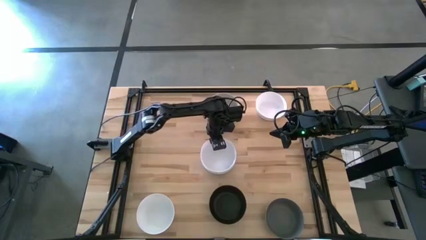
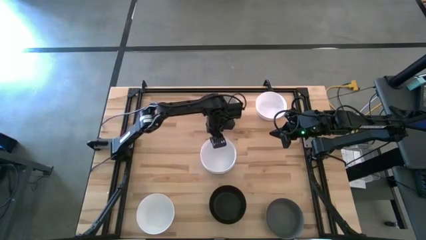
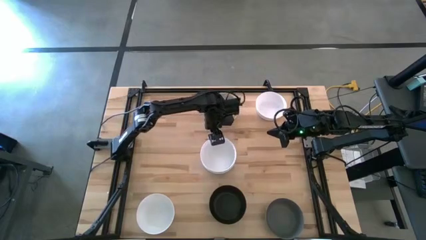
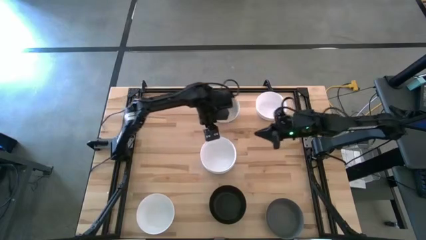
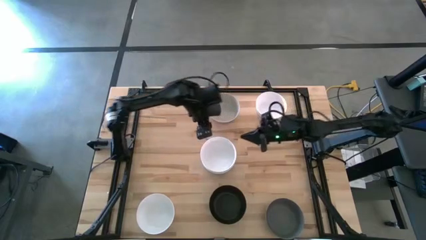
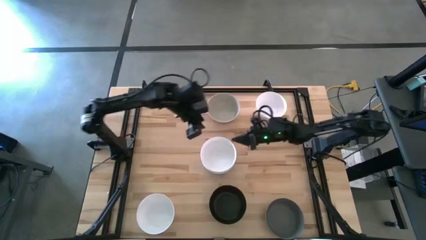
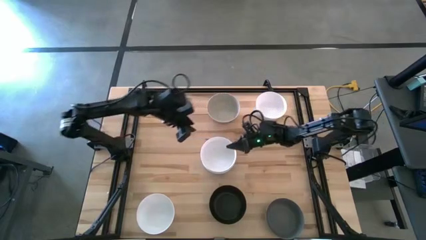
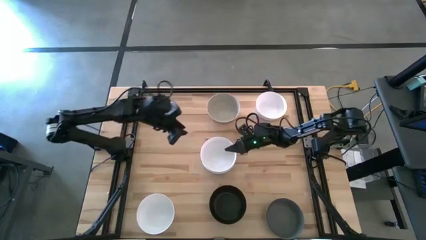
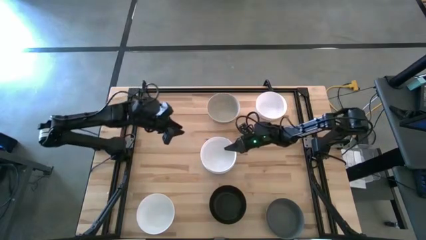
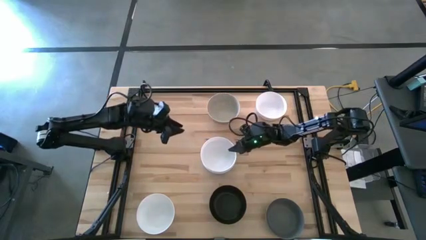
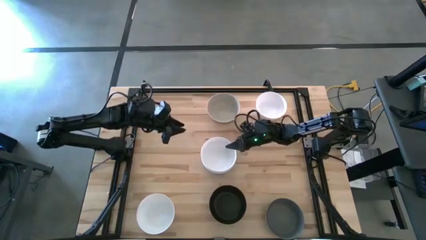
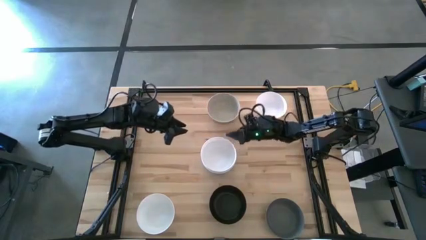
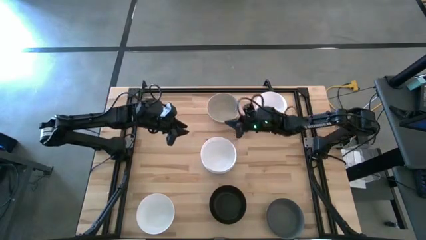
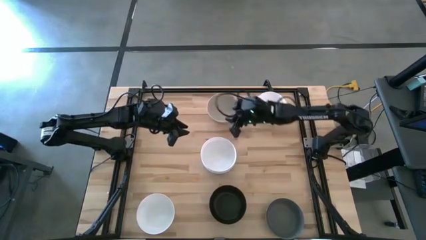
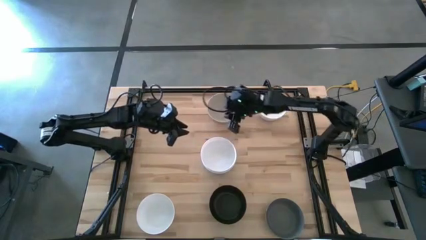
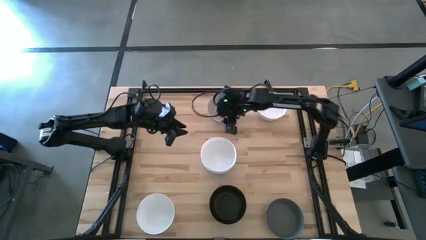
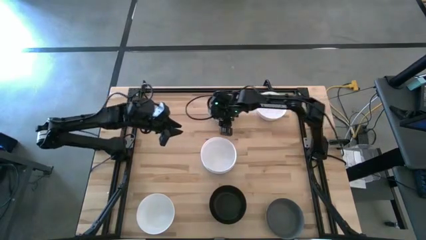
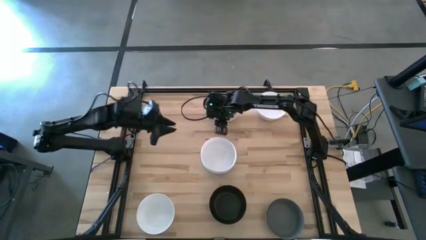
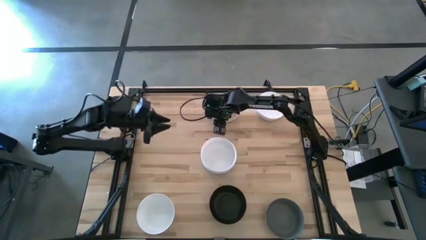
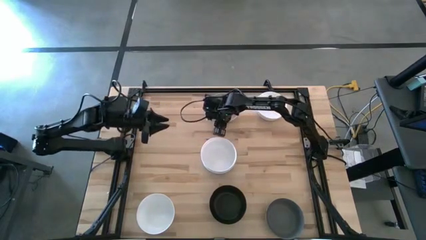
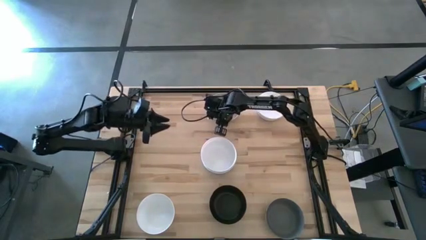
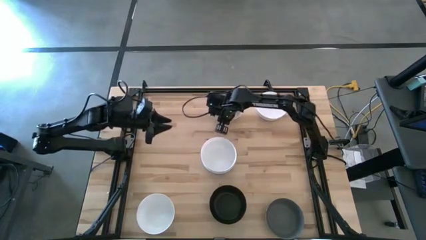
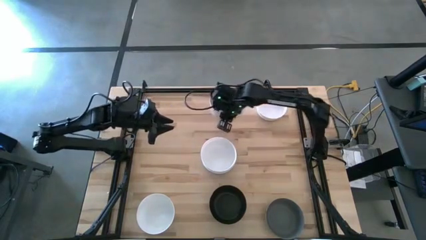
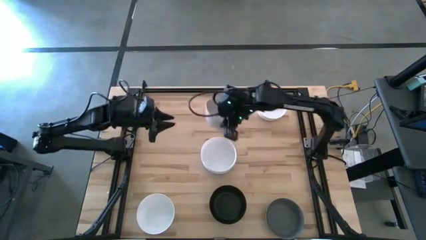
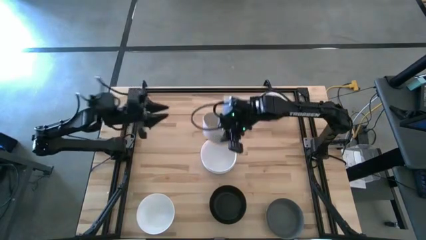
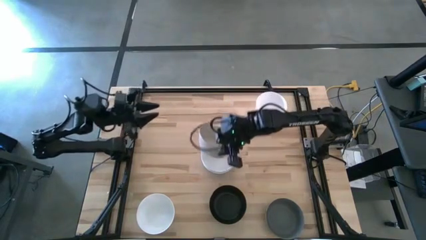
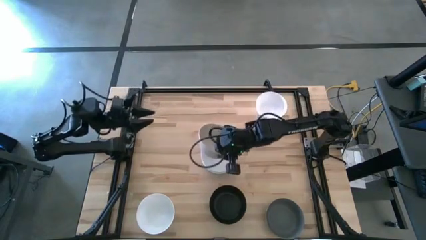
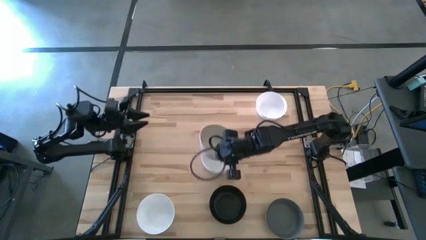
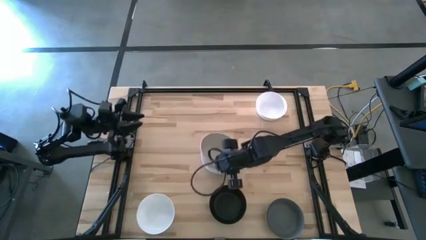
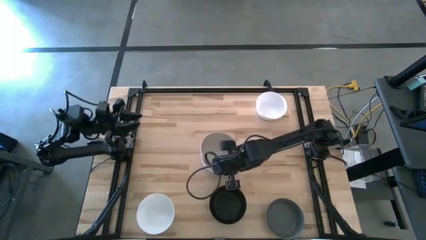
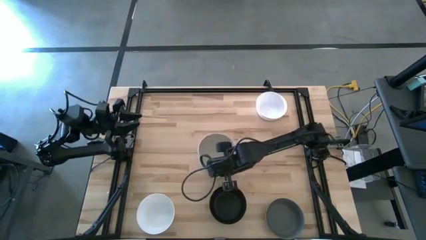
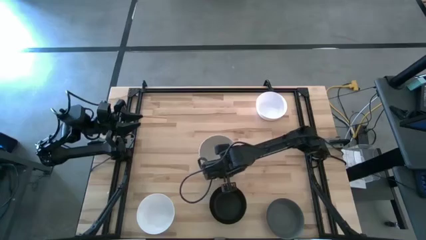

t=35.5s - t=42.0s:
Task: Nest bowls inside each other
Stack the top gray bowl on the white bowl

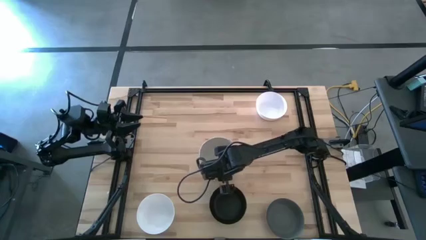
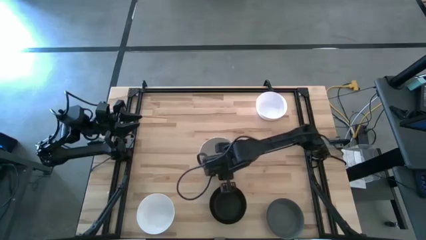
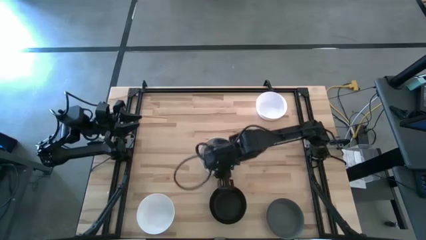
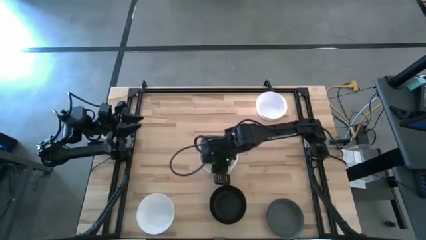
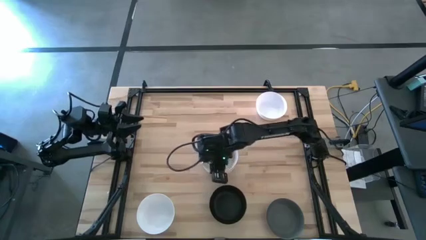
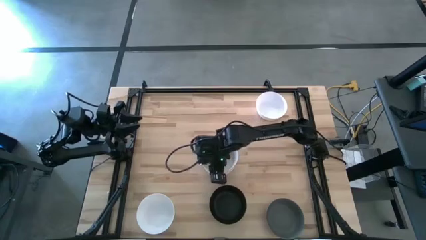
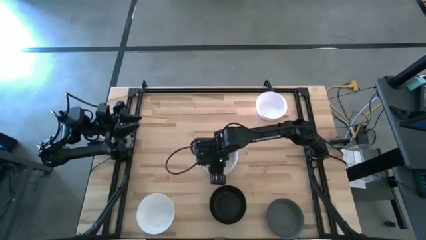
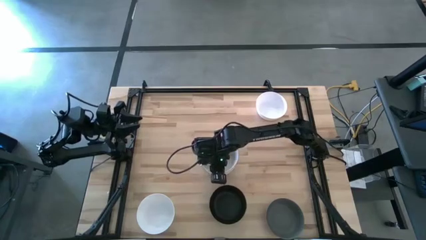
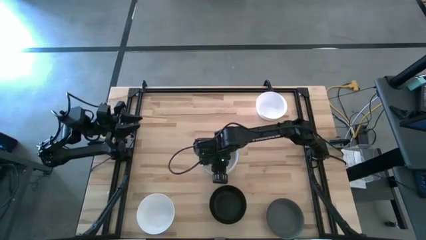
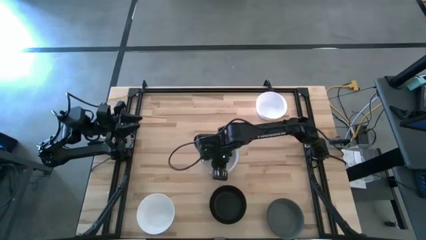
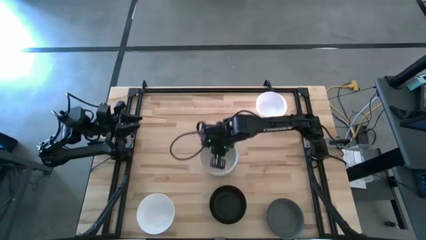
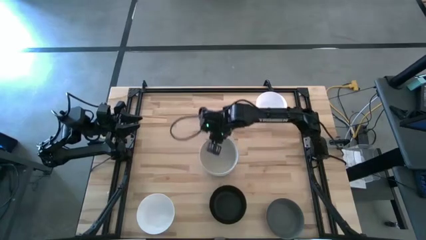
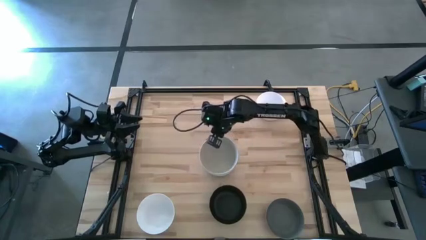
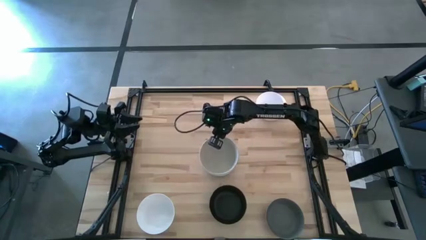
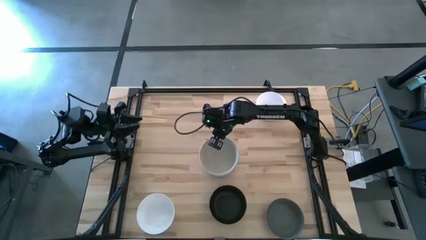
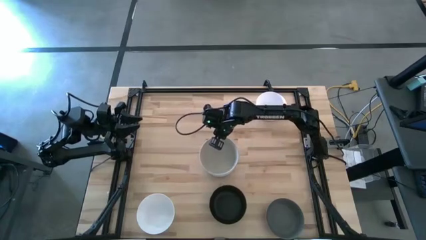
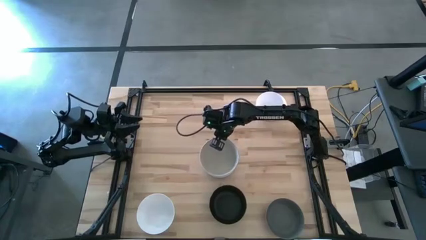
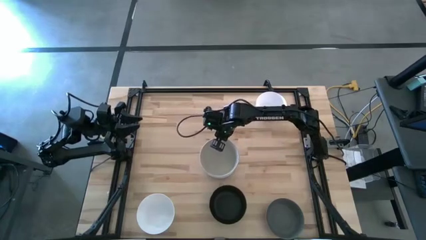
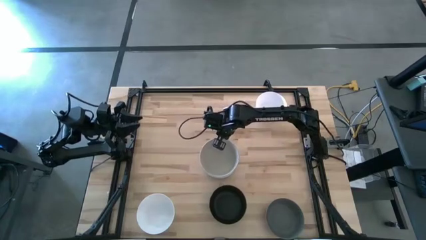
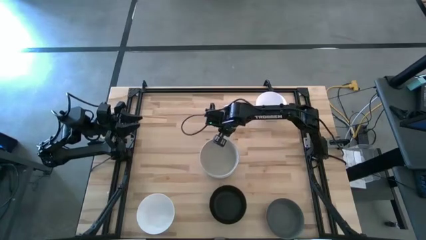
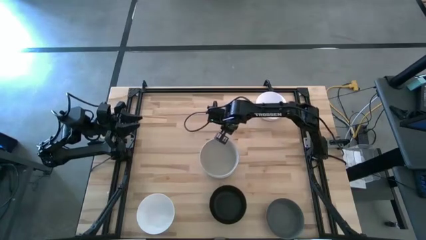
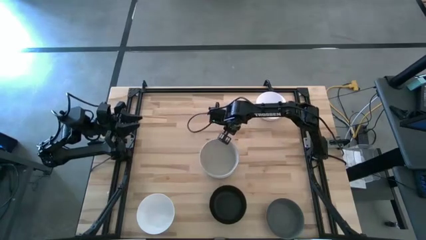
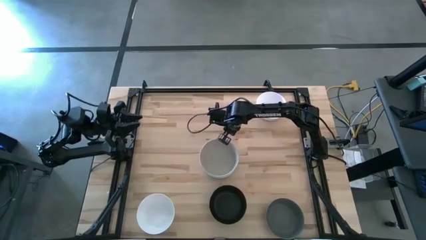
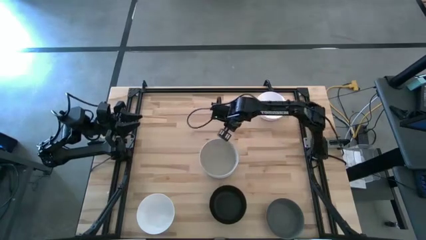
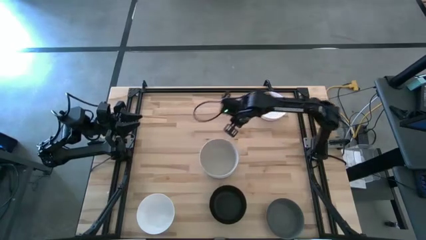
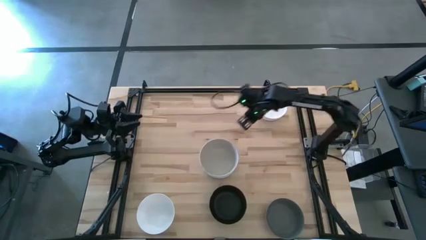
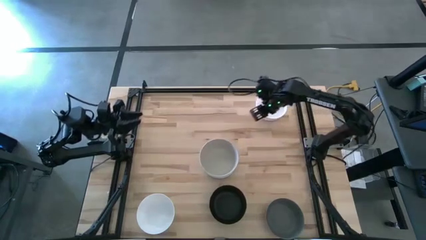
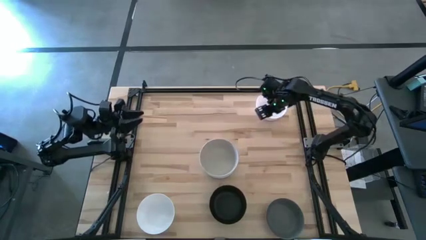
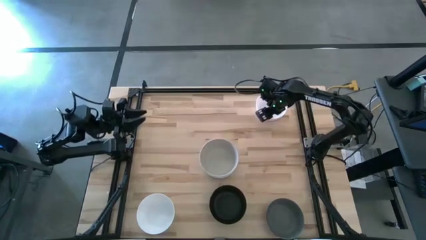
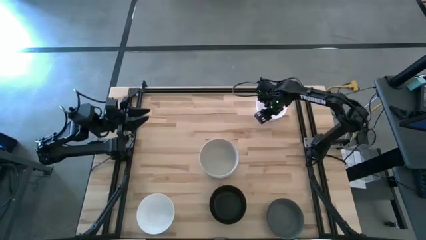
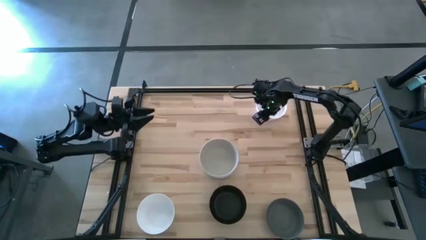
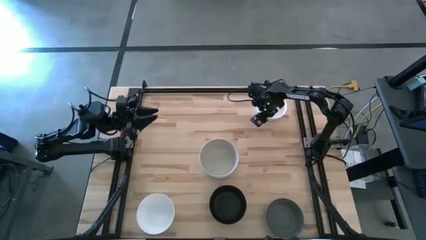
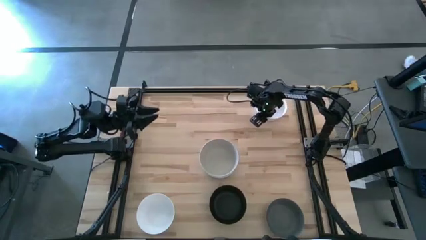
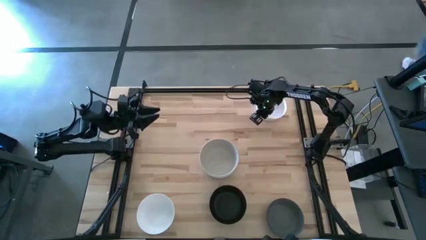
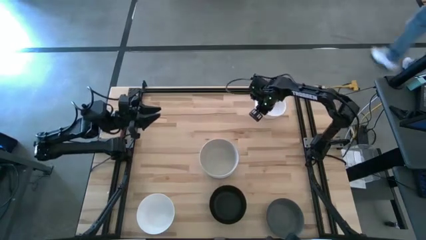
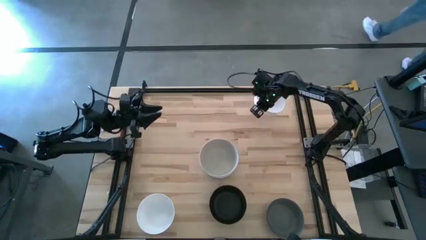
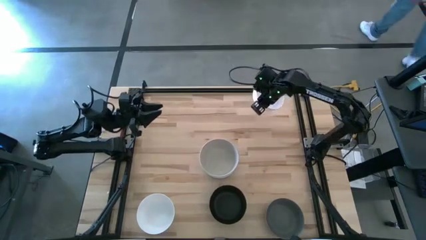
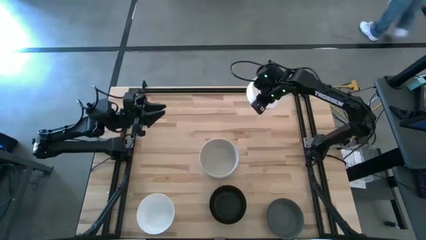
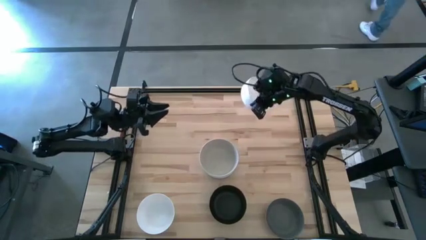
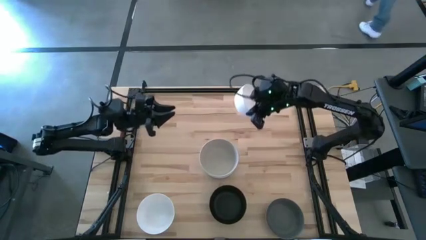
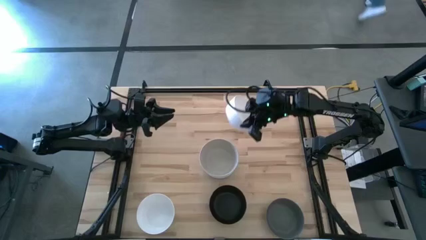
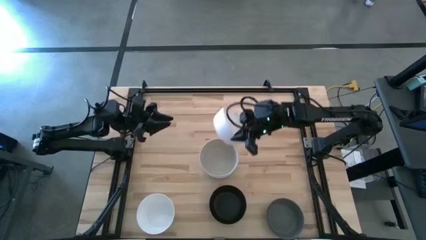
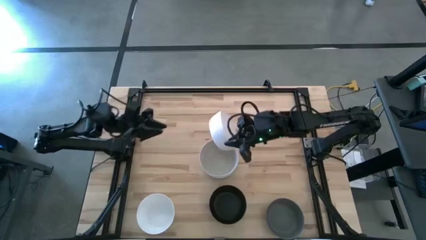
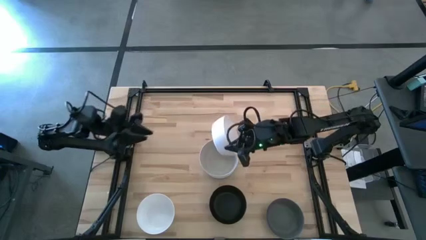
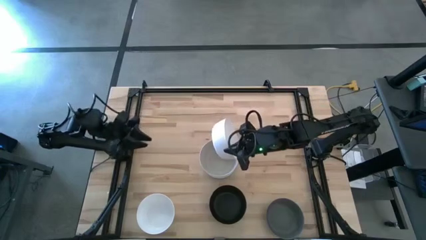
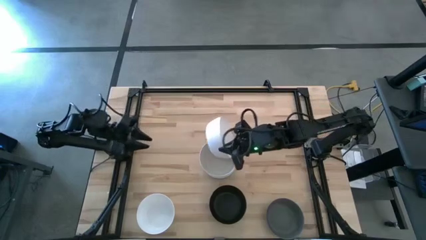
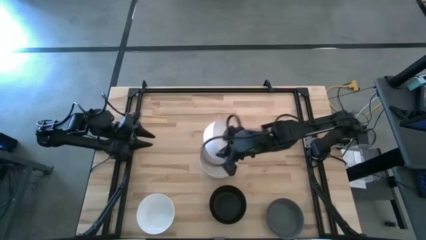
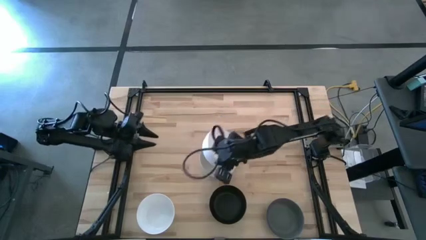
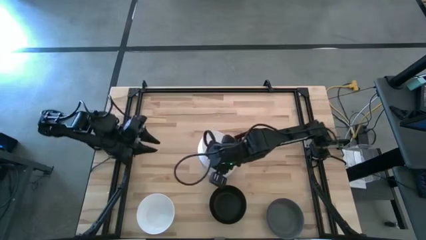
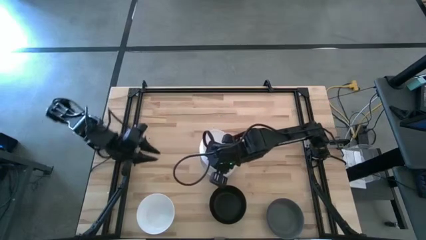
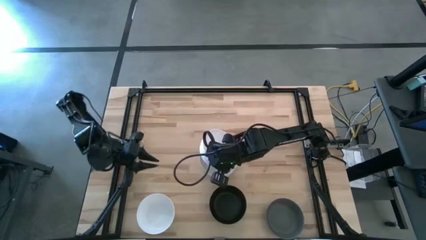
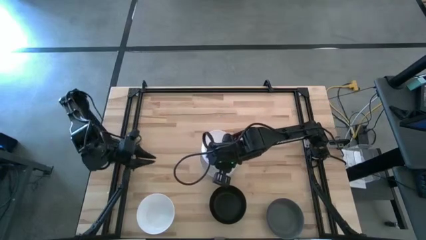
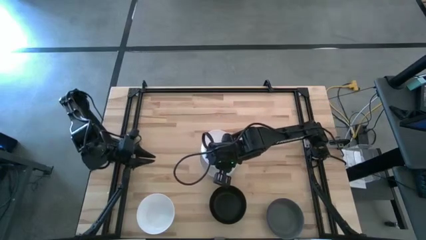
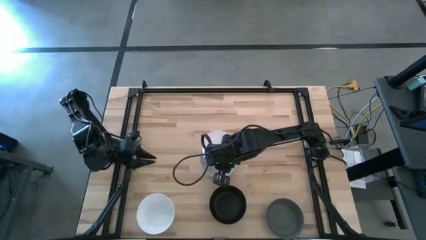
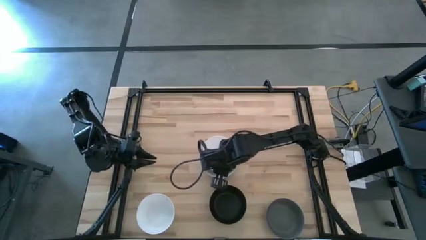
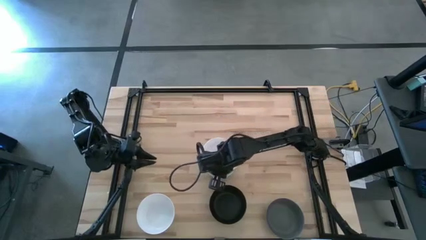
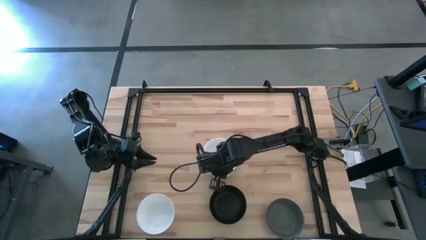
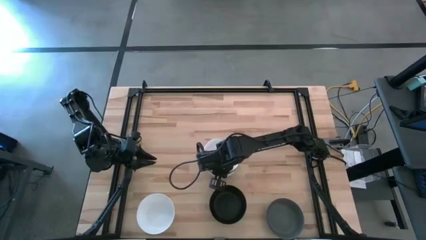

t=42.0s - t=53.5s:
Stack the top white bowl on the gray bowl
